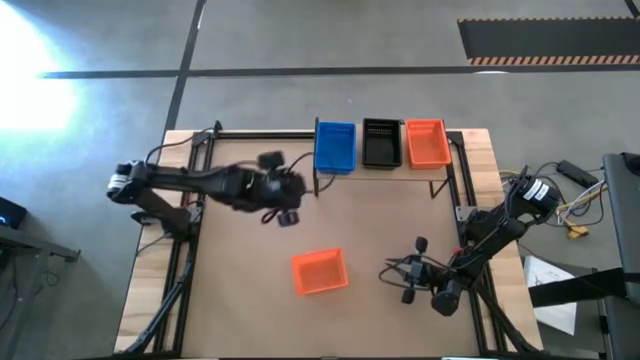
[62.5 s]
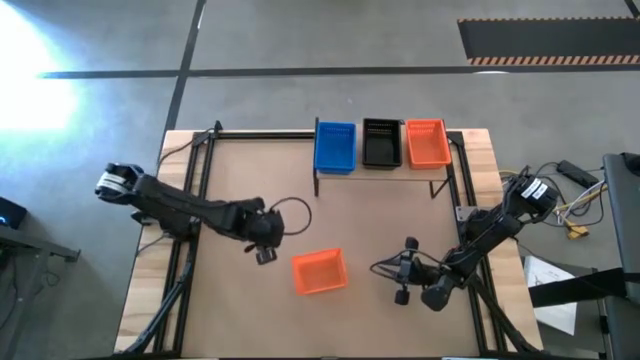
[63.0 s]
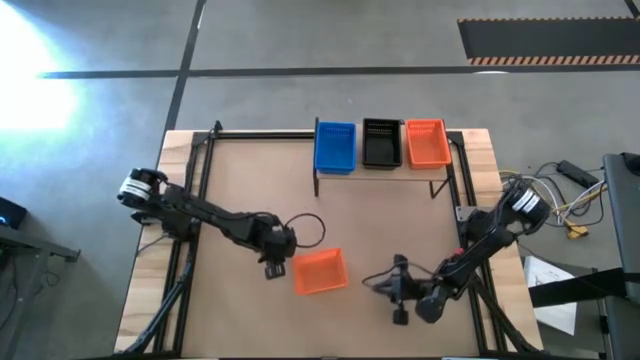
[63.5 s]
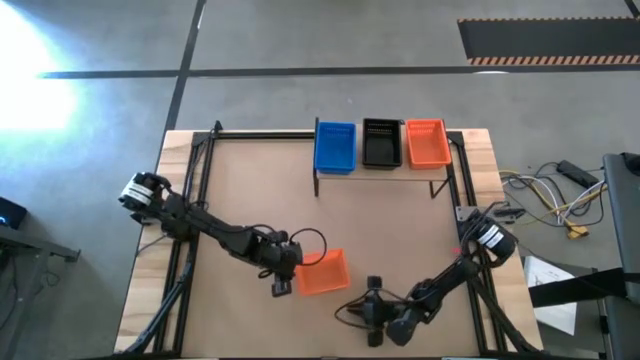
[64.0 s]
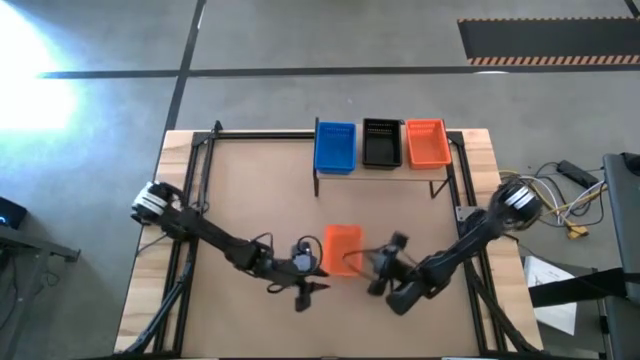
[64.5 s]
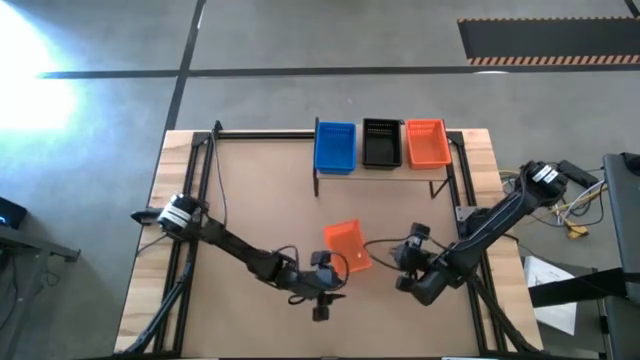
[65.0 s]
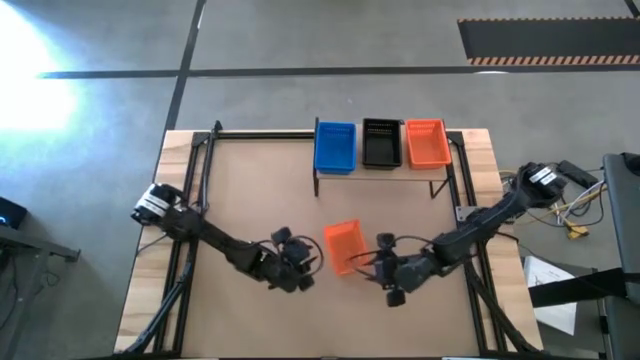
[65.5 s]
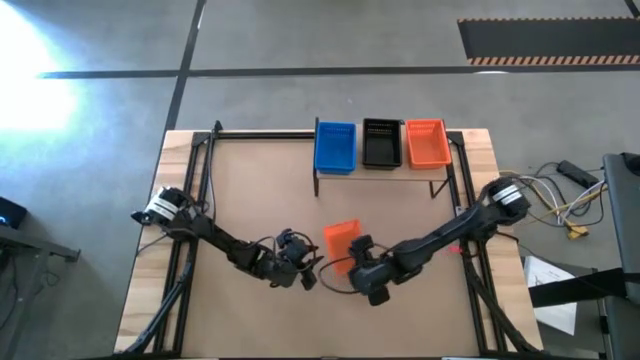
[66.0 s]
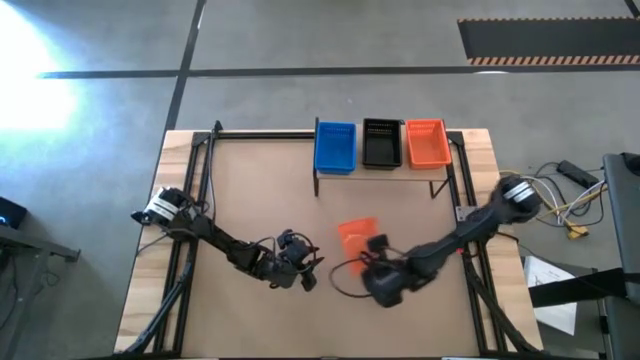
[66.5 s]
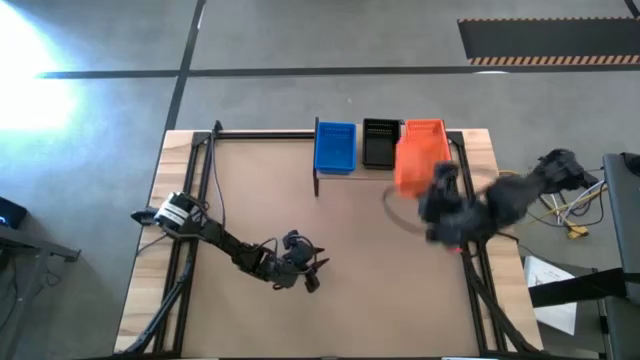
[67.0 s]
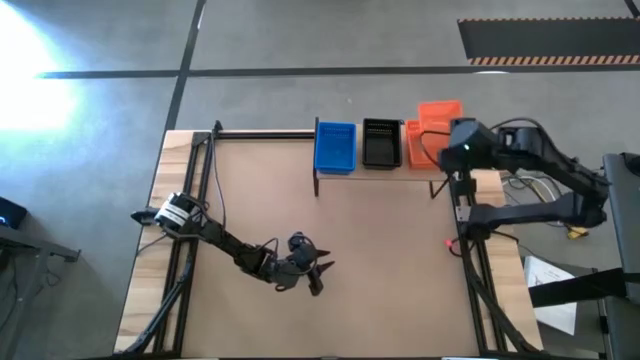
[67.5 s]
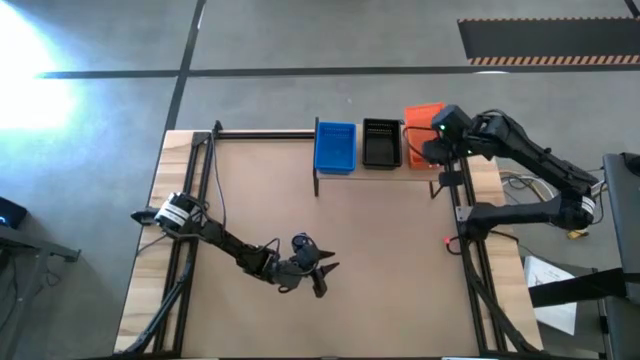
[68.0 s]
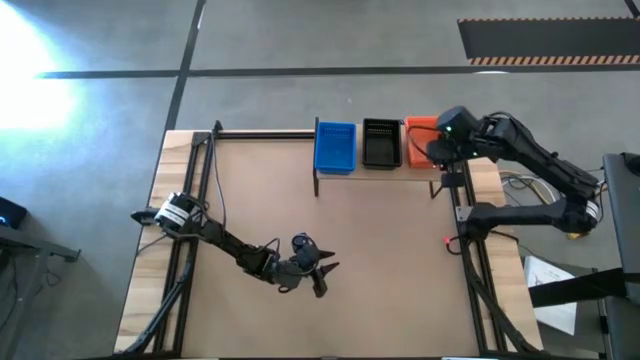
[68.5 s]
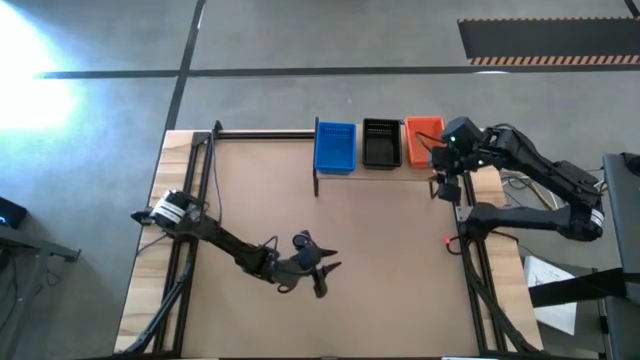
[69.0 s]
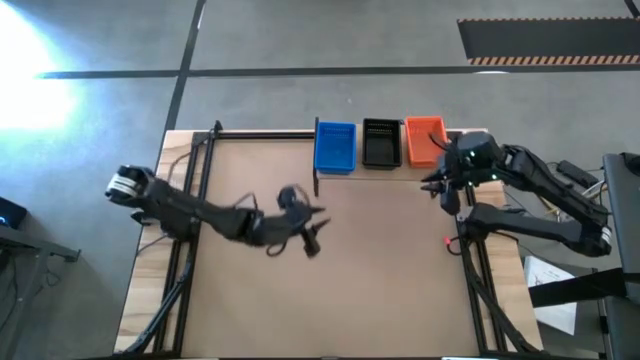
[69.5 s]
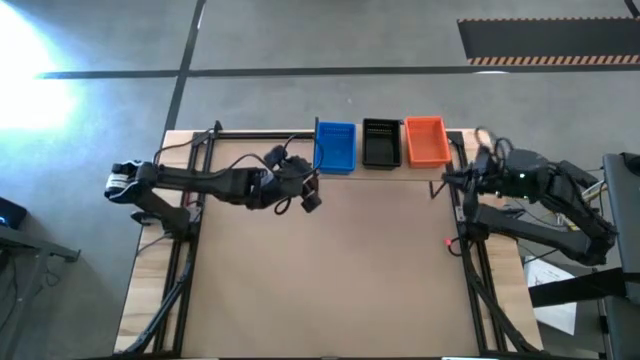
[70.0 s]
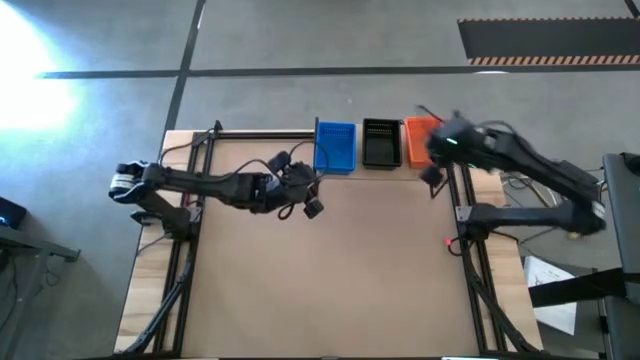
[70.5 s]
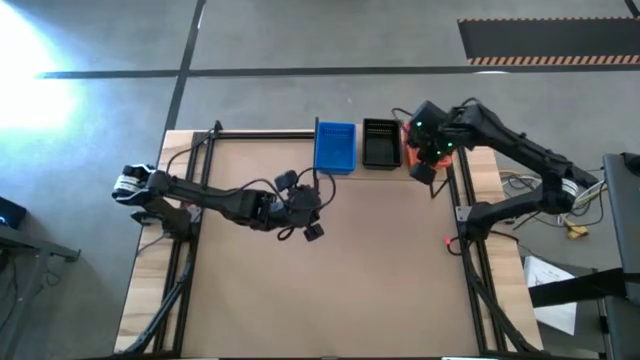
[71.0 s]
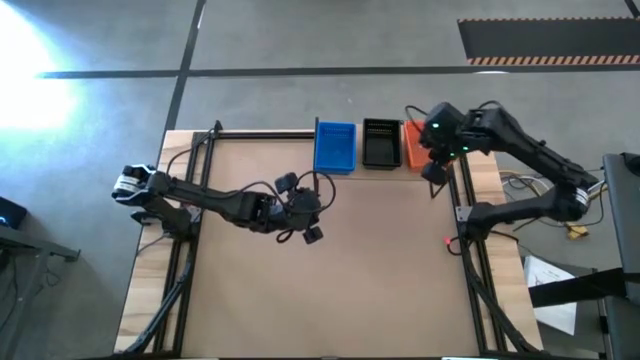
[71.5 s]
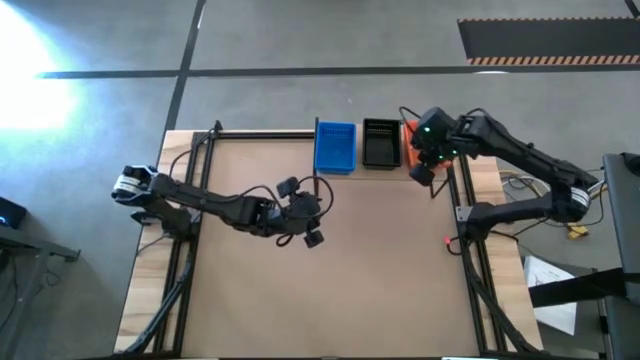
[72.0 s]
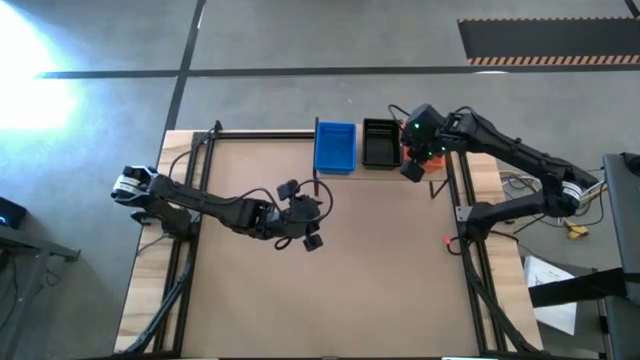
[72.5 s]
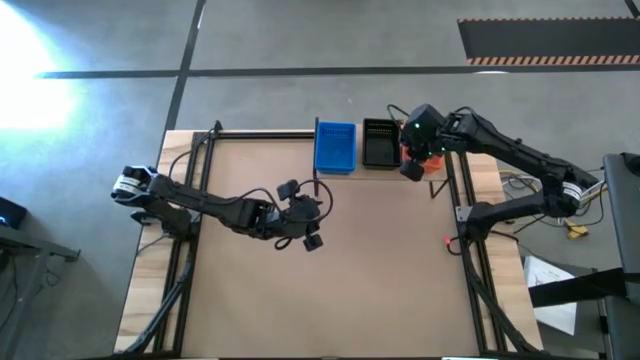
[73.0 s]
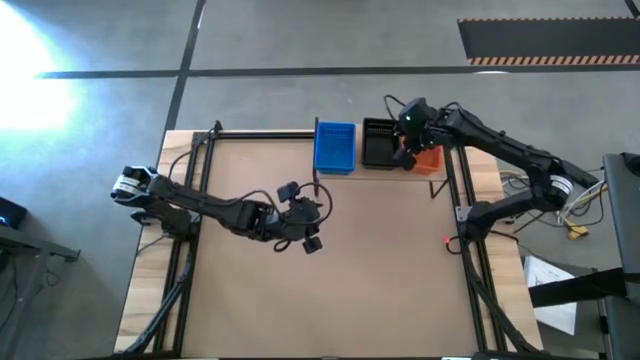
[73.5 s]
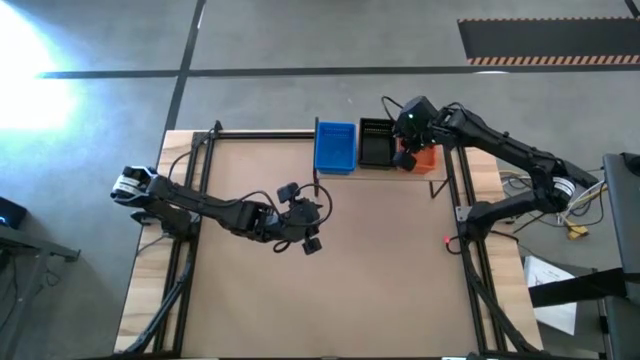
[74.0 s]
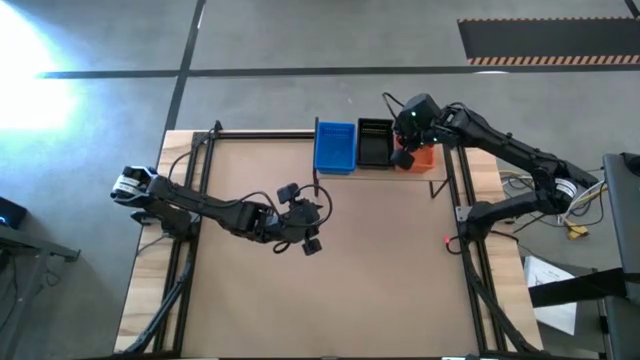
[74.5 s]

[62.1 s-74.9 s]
Task: Stack baskets on shelf by color
Stack the orange bin on top of the orange bins on the shelf

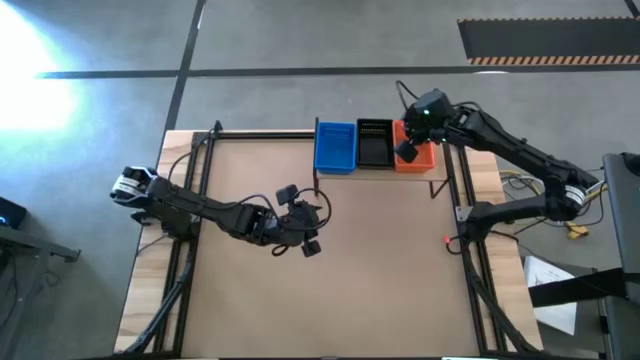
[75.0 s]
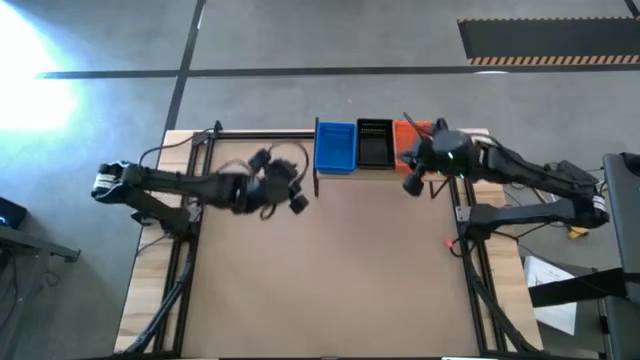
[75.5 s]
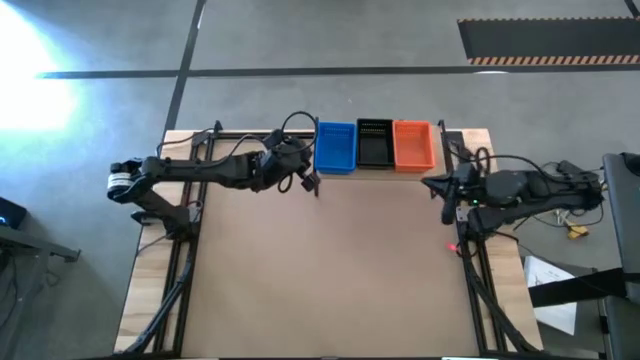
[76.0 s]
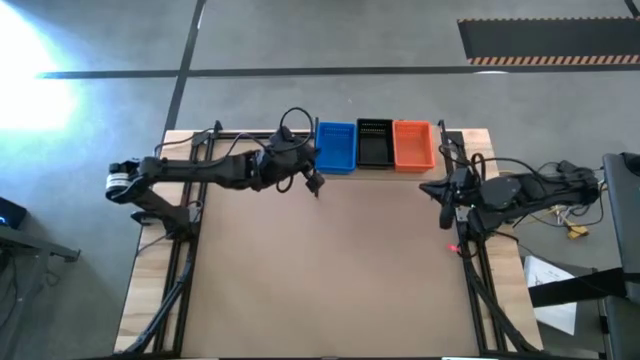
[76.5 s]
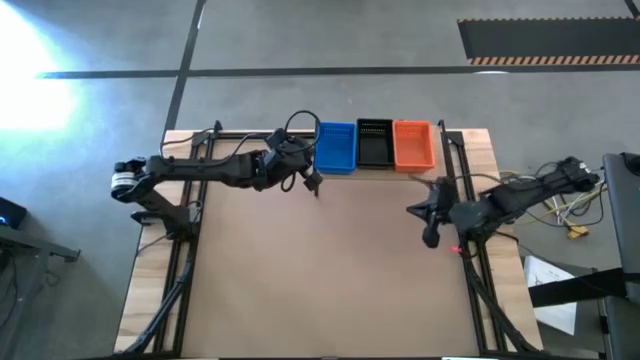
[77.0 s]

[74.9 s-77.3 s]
Adjust the stacked blue bins on the shelf

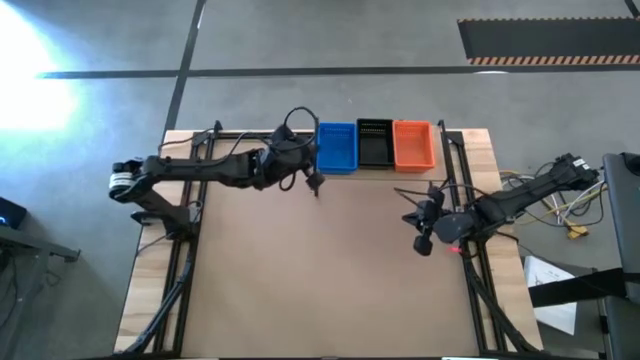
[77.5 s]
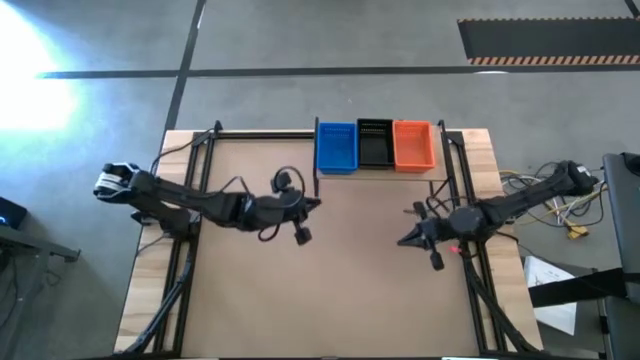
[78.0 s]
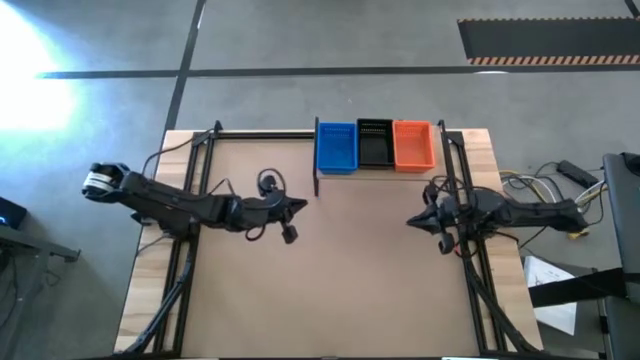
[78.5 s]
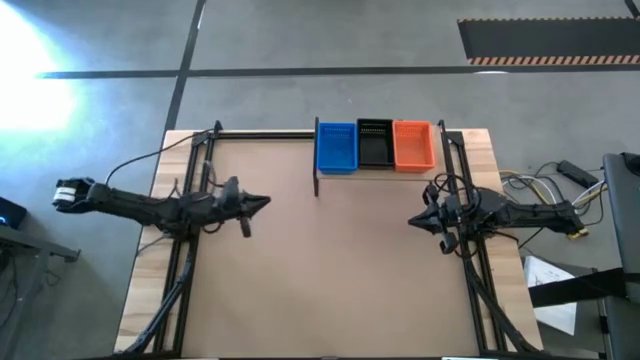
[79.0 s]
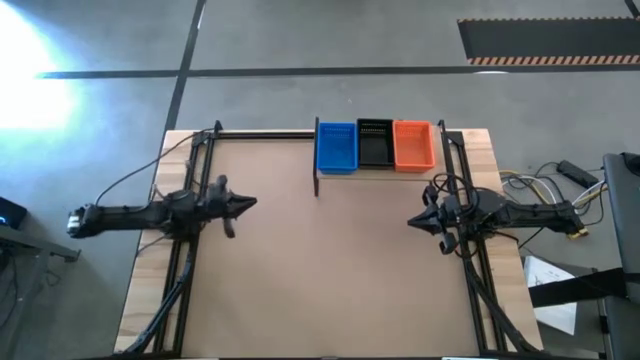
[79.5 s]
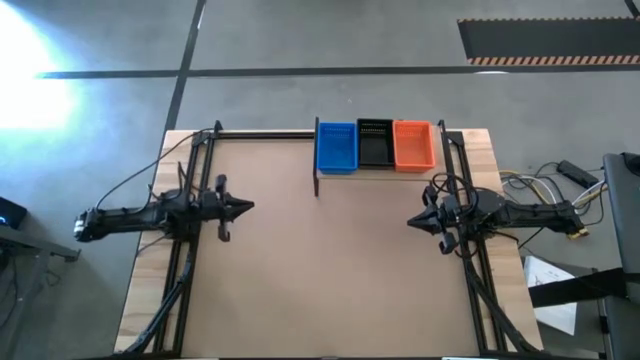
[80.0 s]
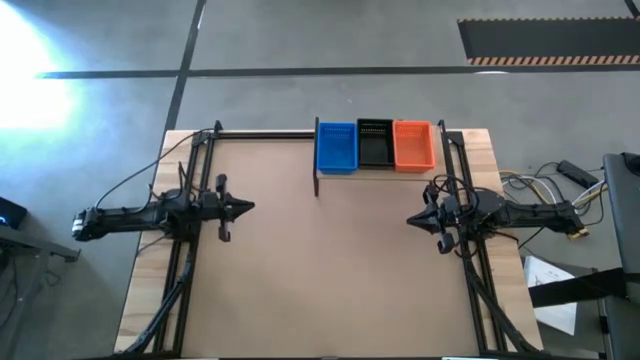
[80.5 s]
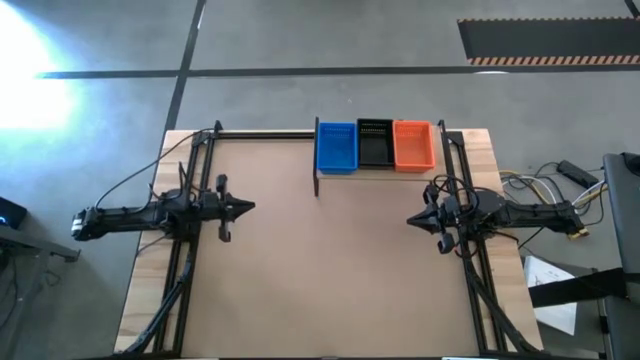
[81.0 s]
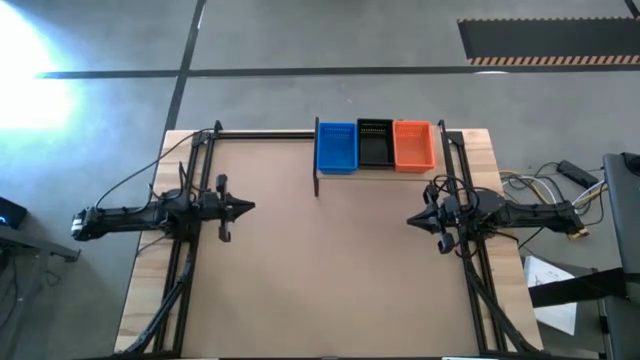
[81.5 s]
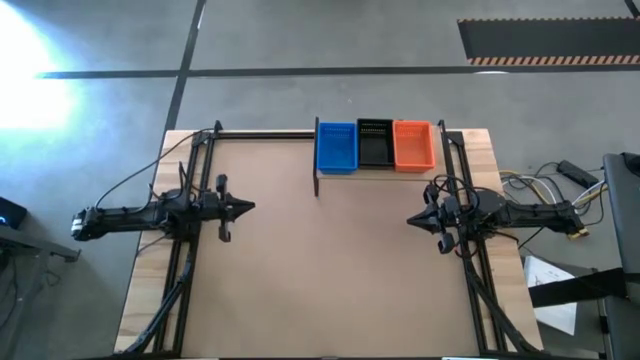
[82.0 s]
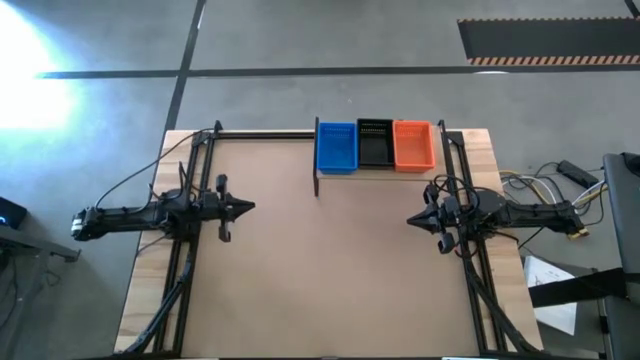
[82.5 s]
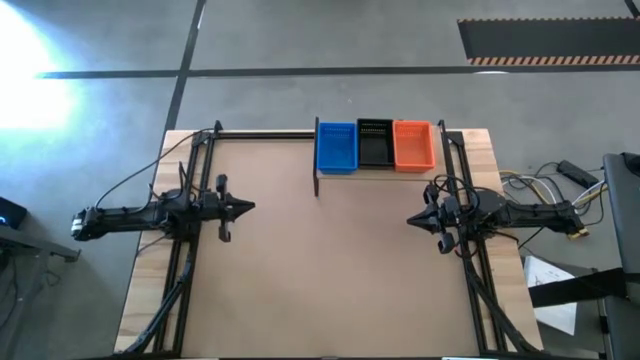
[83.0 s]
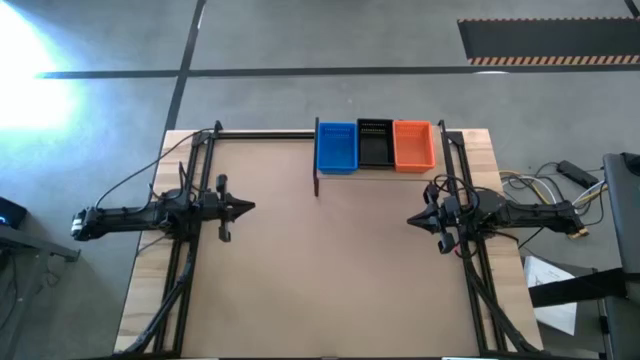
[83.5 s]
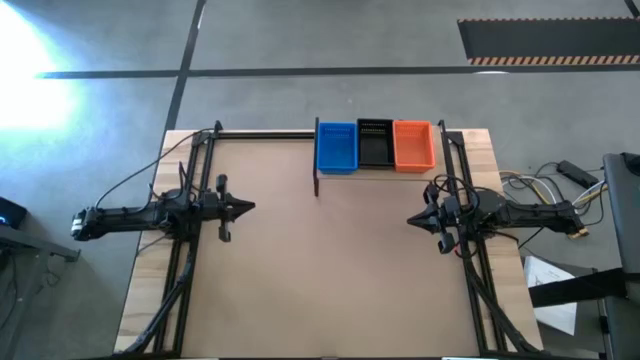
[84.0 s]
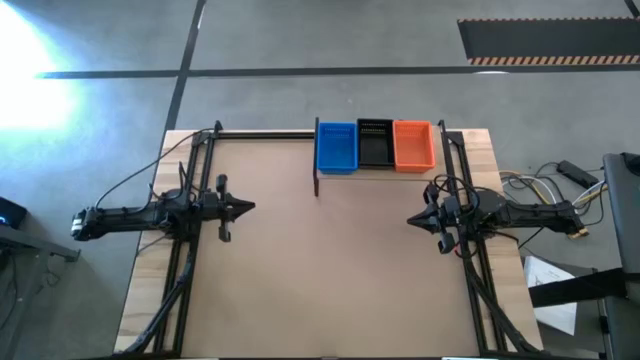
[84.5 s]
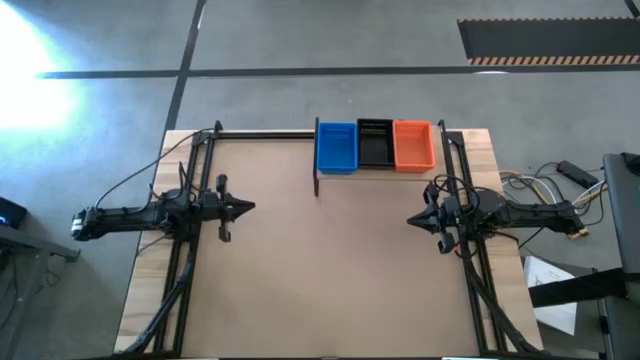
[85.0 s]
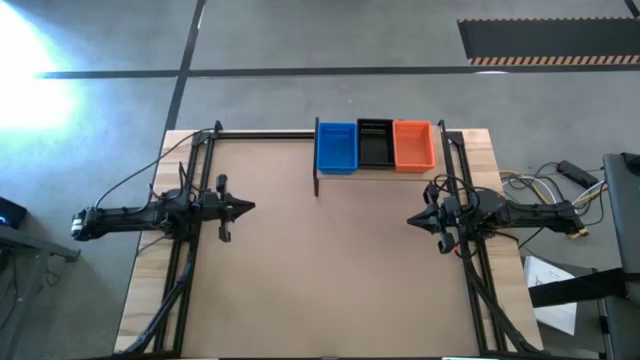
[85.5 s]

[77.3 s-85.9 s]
Return to Home Position
